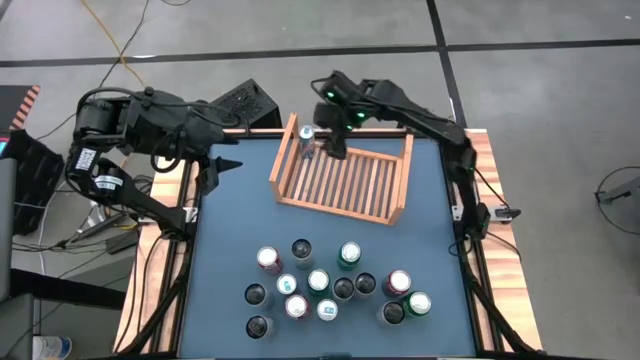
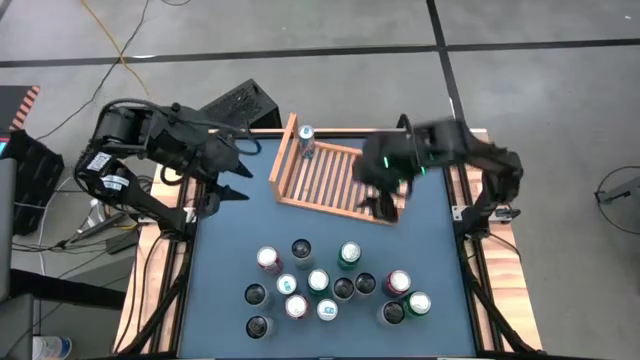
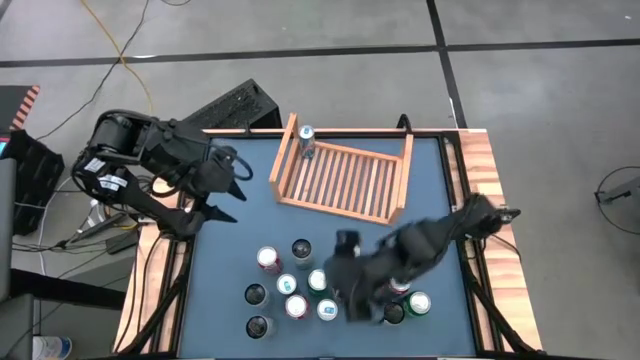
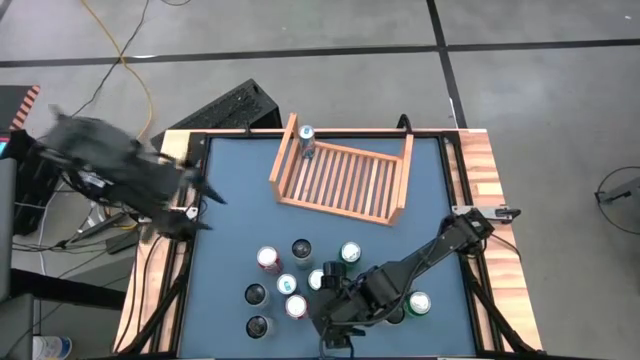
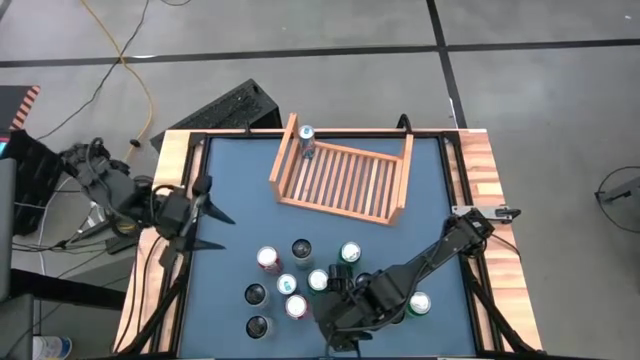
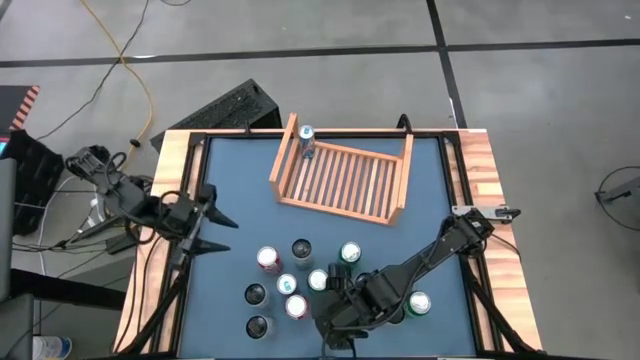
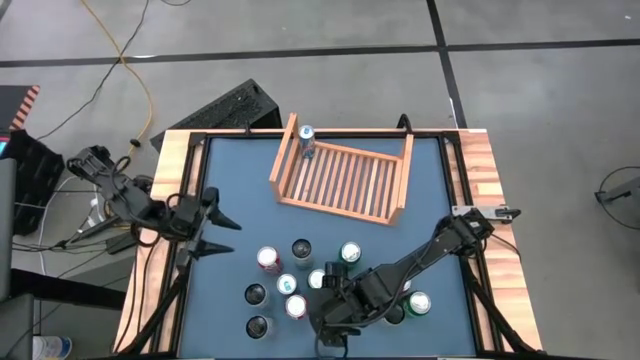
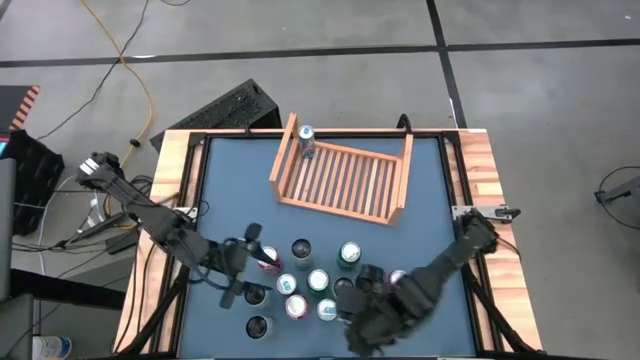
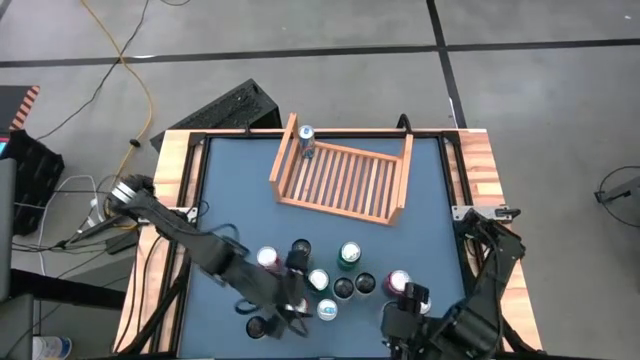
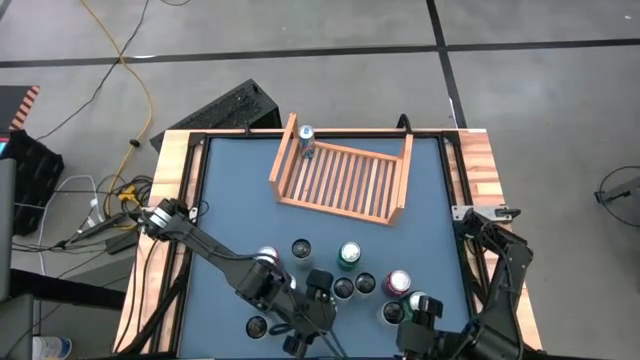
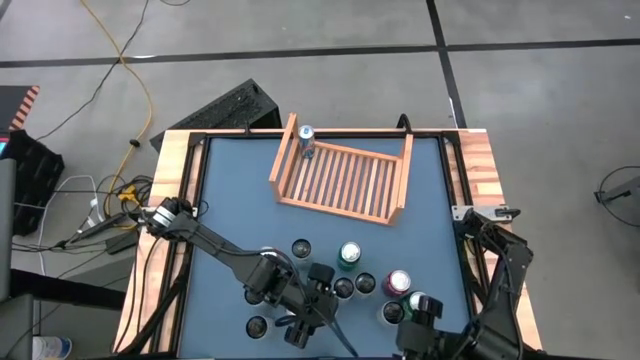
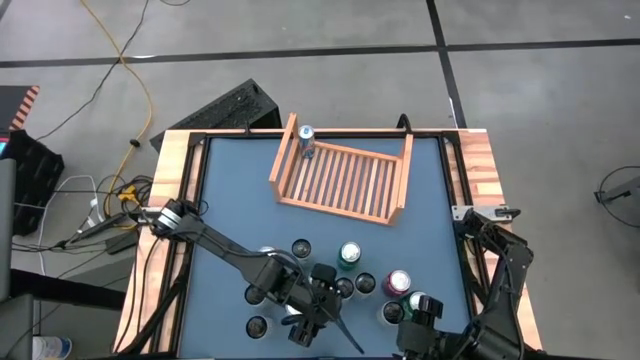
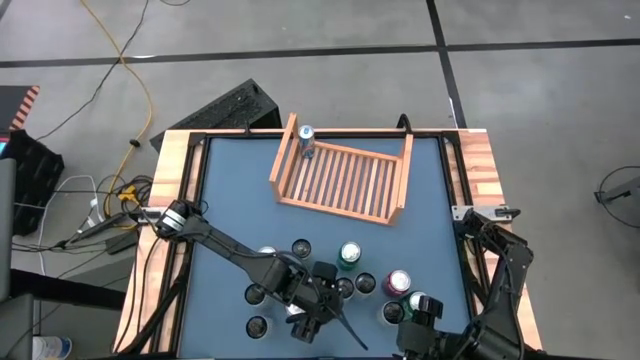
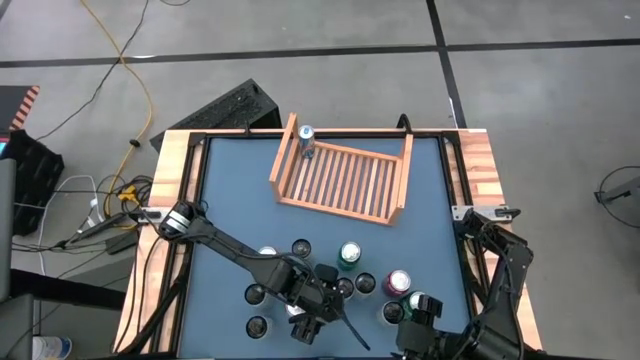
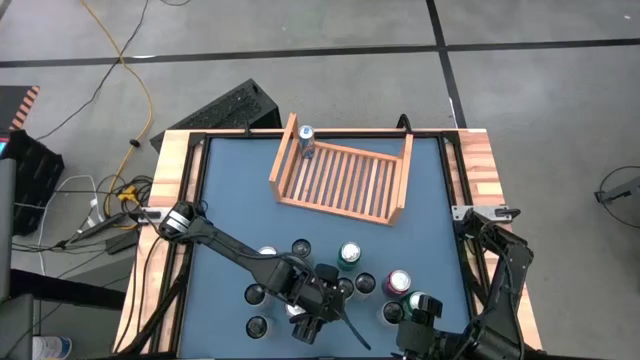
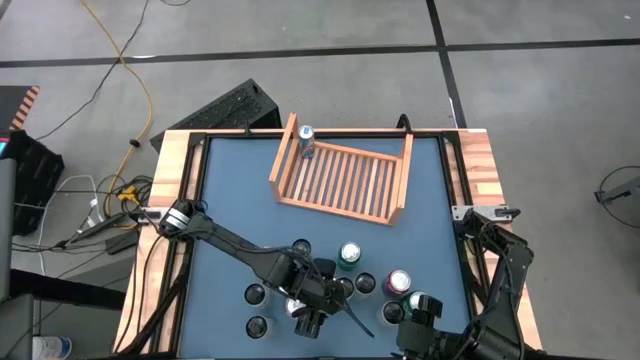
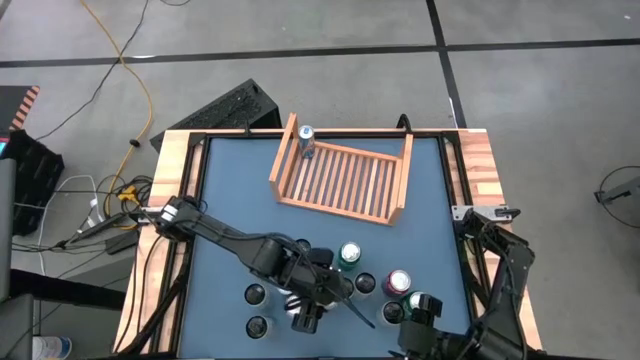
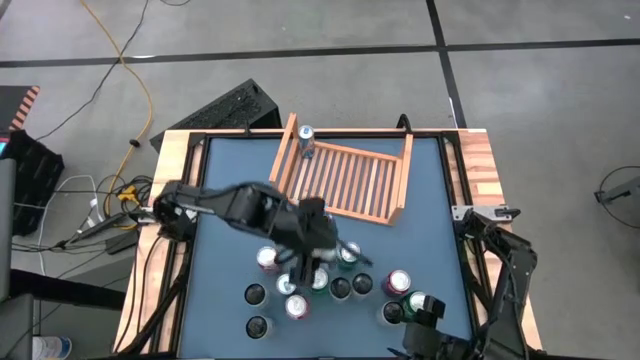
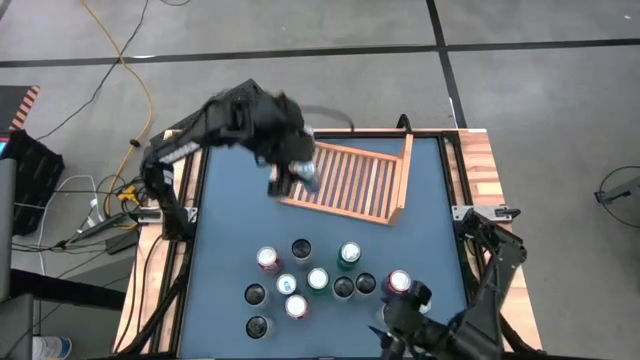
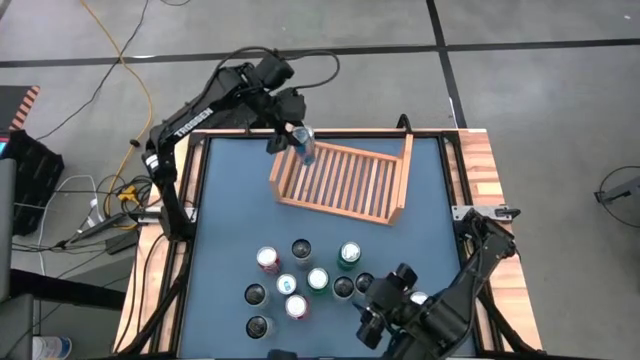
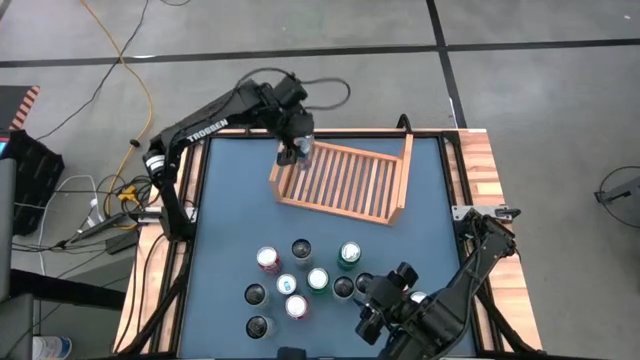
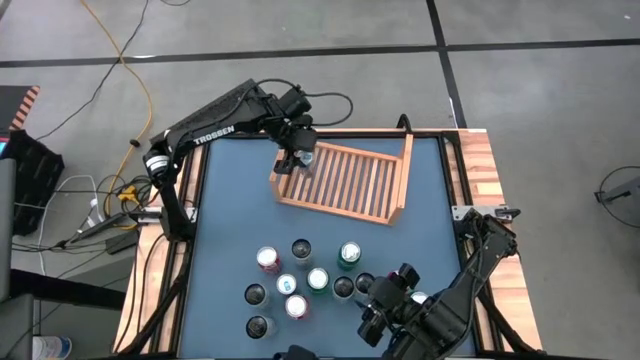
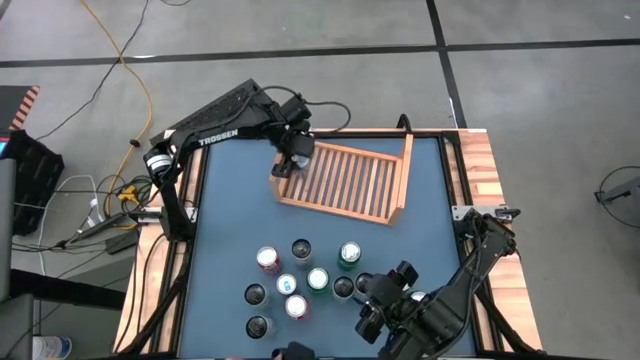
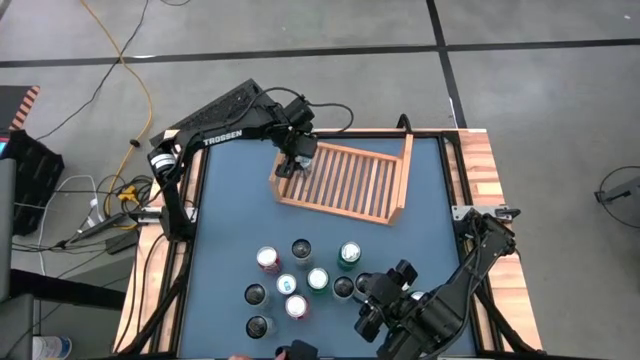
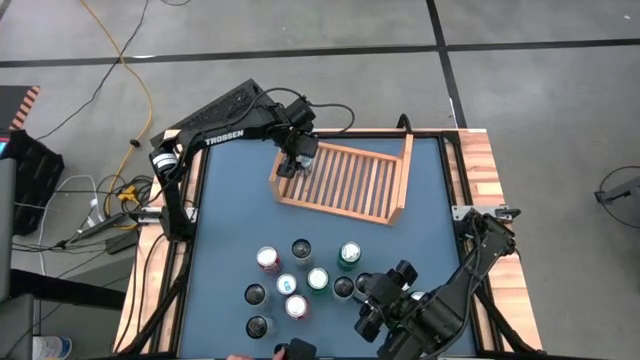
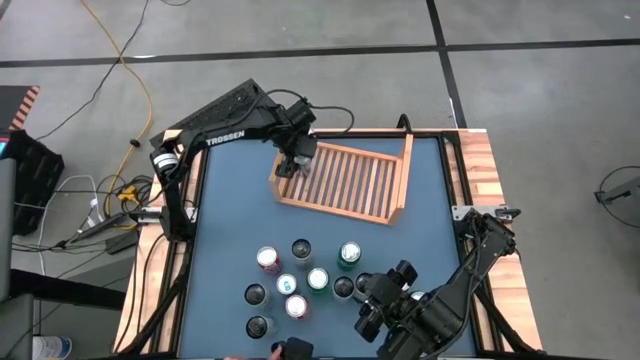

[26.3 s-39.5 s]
Task: Place canned beverage on shelf
Put the blue soda can on the shelf

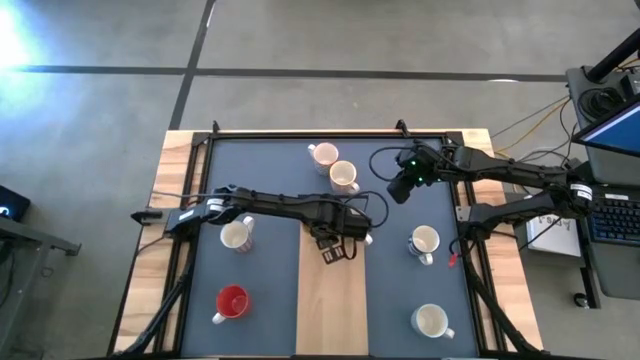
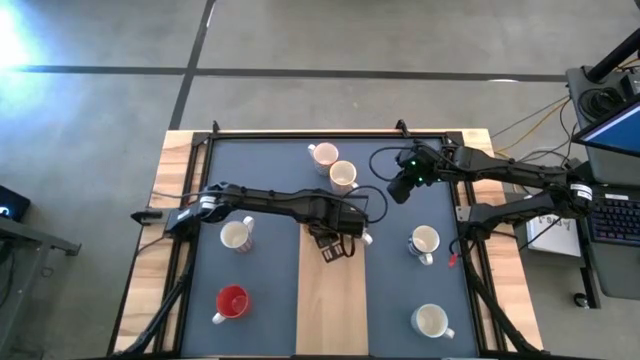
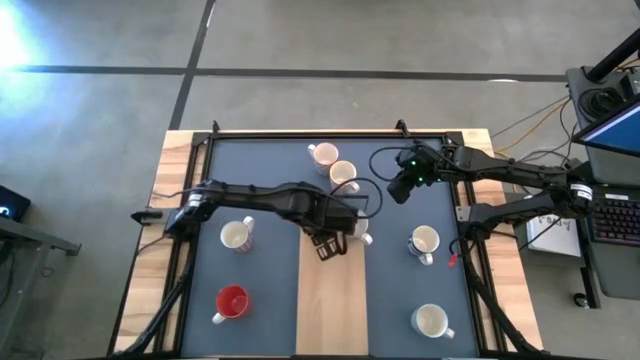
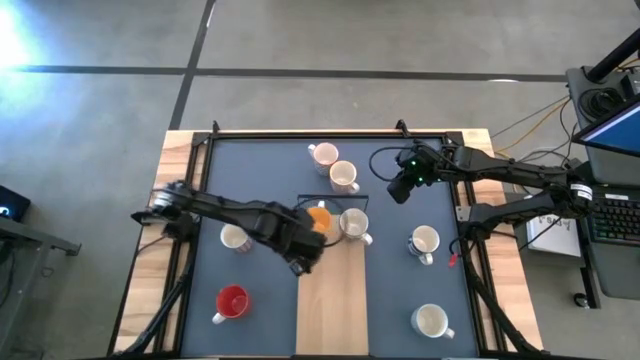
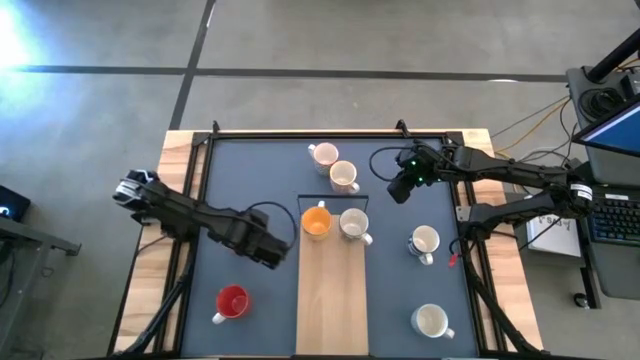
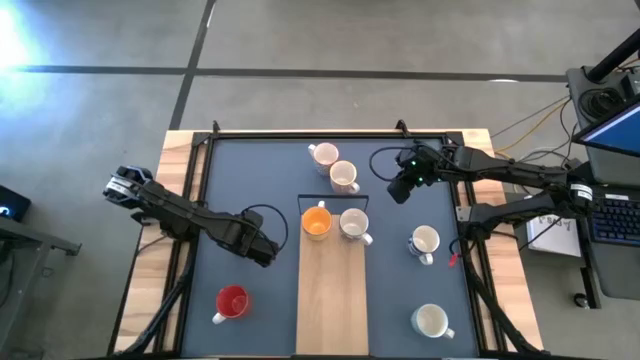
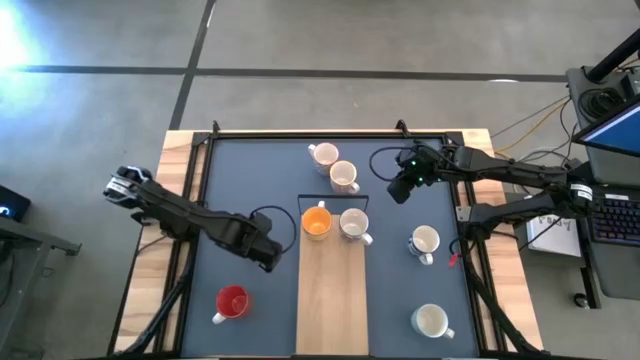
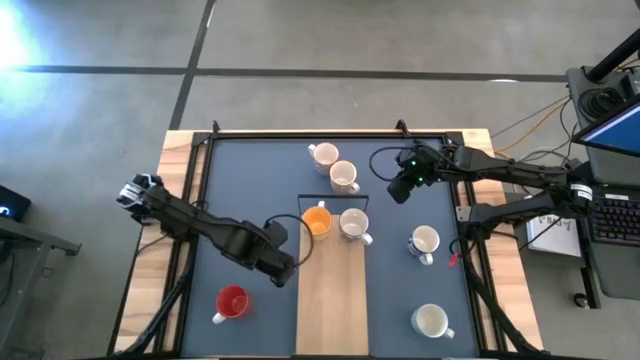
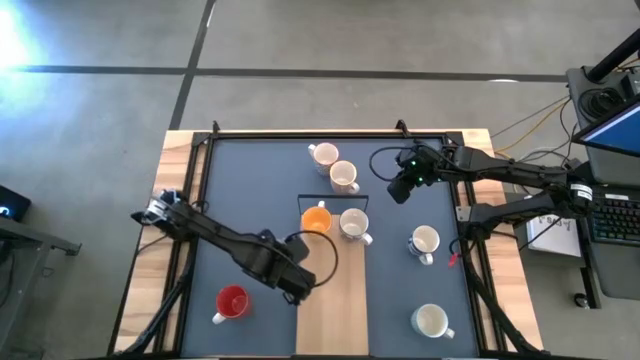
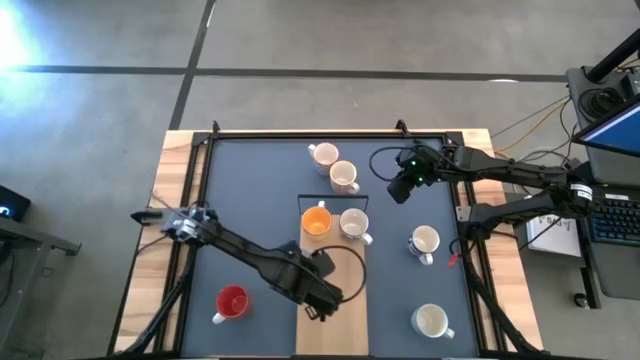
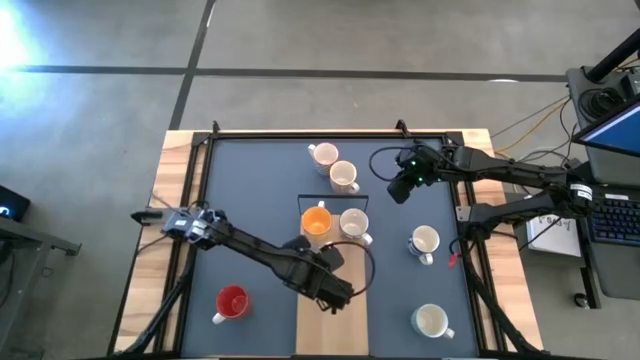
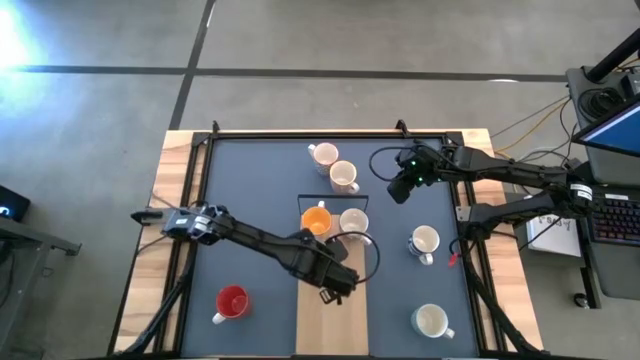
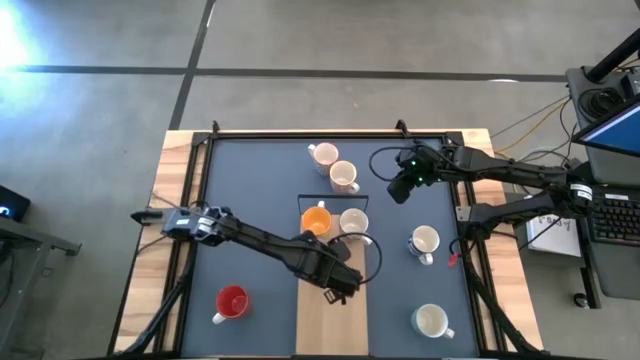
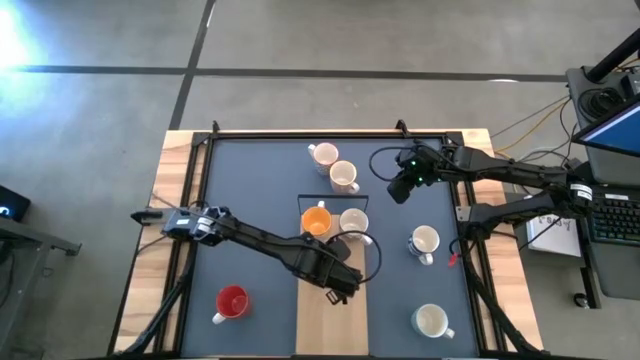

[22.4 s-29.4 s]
Task: Place coffee mugs
Put the light red mug on the shelf

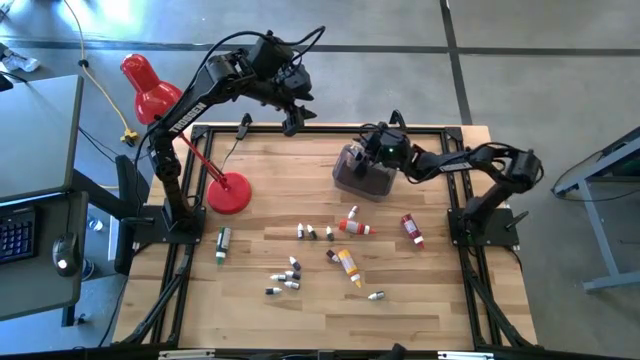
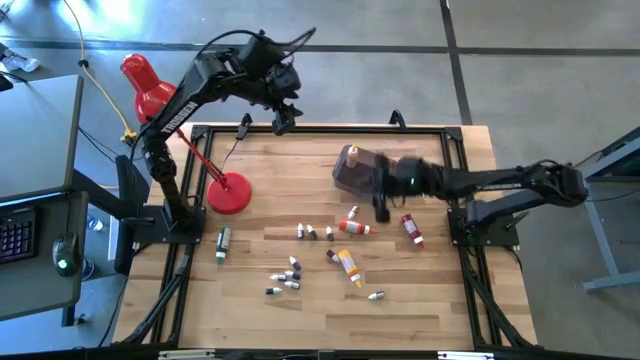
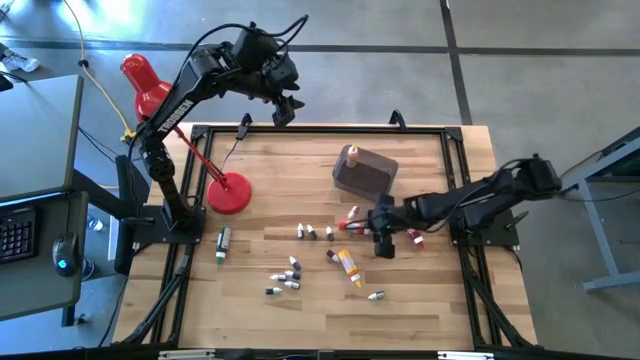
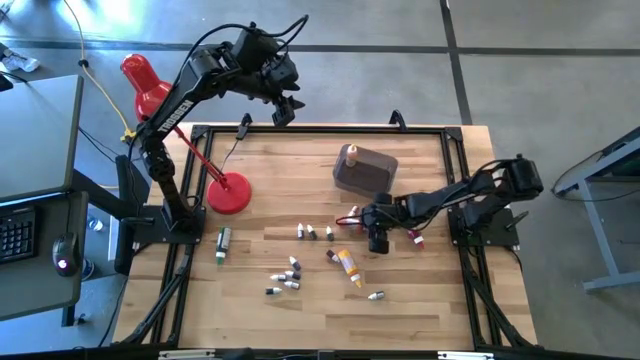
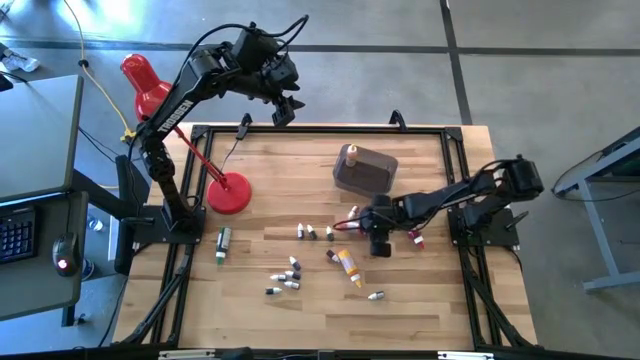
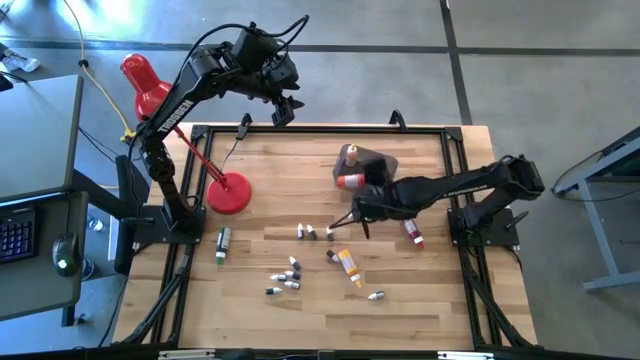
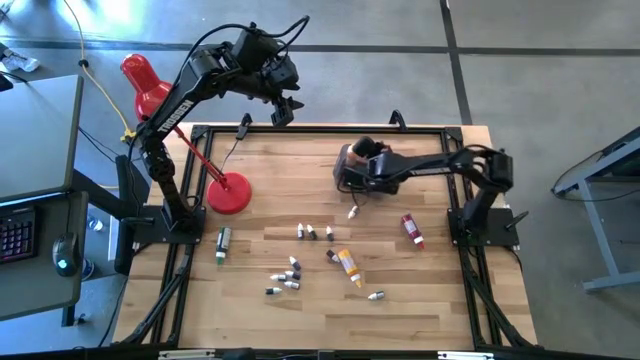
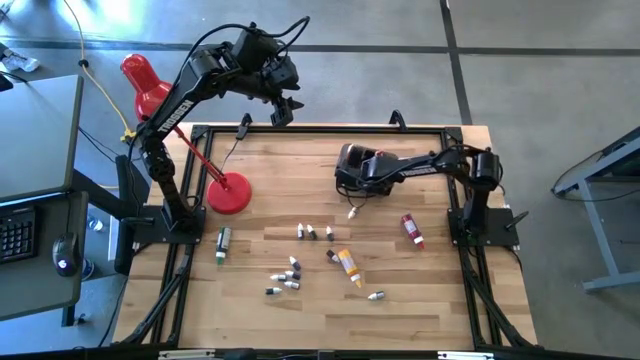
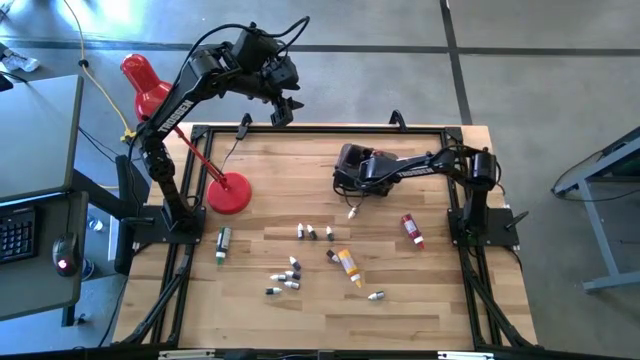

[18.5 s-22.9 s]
Task: Pick & Place food coloring
Put the large orange food coloring bottle into the bin
